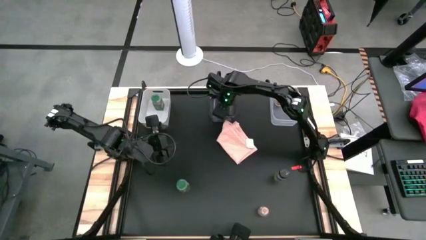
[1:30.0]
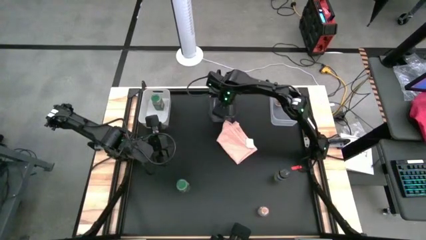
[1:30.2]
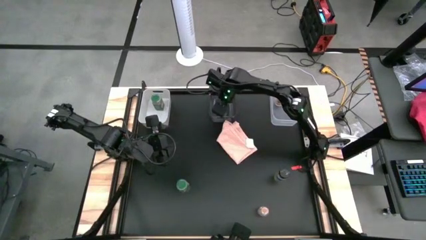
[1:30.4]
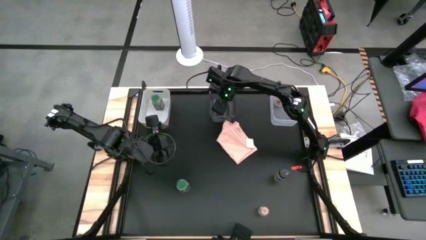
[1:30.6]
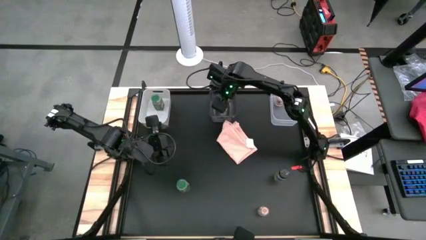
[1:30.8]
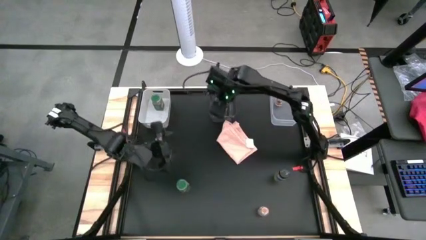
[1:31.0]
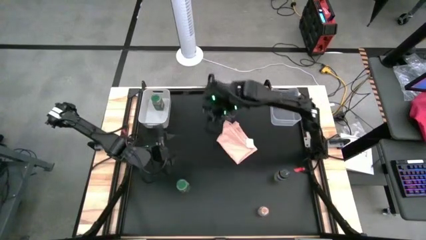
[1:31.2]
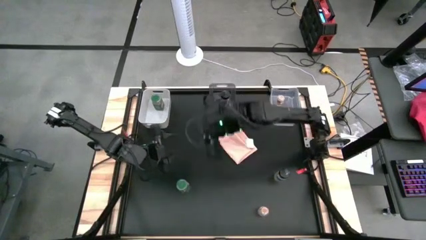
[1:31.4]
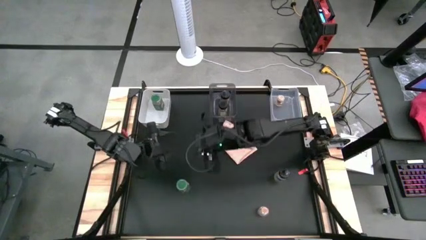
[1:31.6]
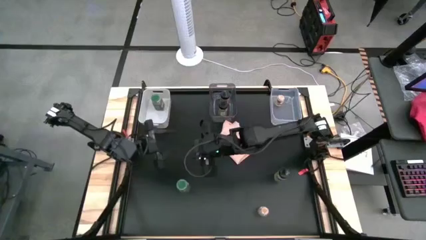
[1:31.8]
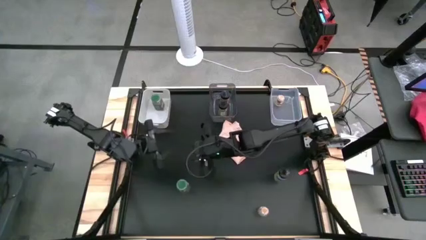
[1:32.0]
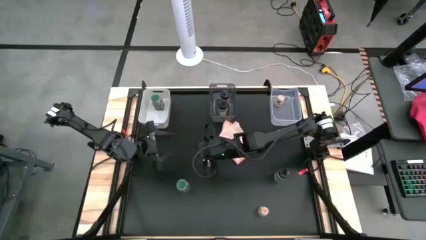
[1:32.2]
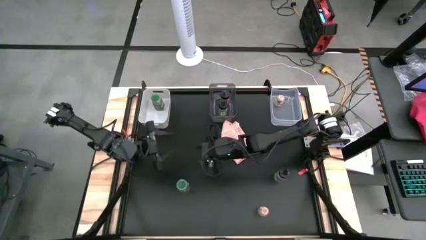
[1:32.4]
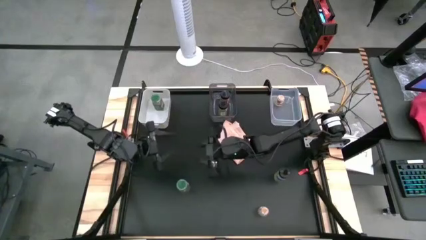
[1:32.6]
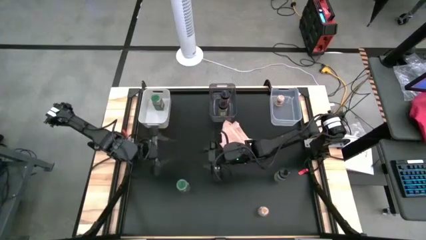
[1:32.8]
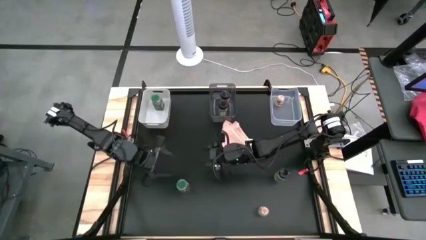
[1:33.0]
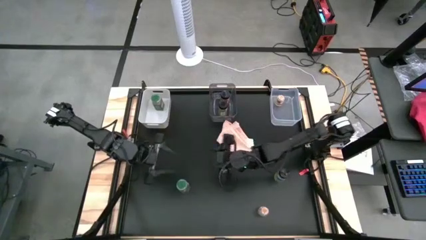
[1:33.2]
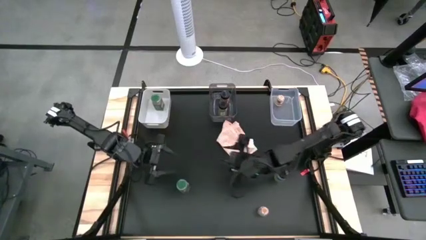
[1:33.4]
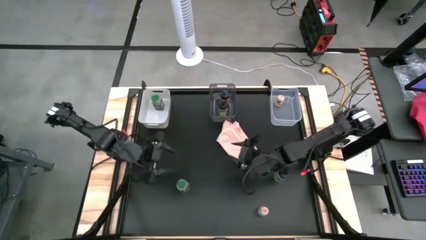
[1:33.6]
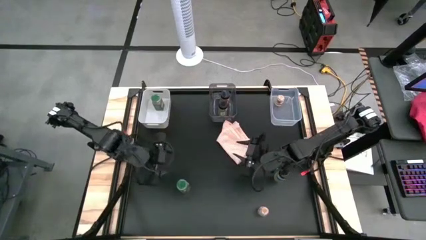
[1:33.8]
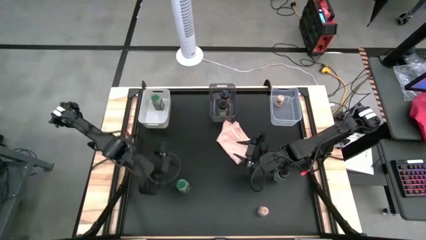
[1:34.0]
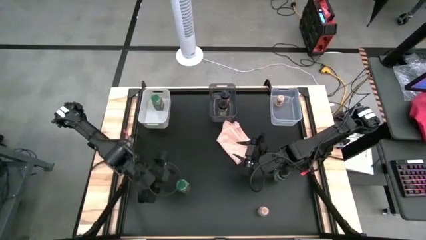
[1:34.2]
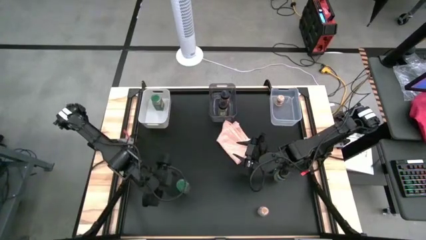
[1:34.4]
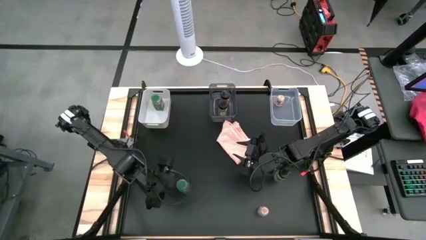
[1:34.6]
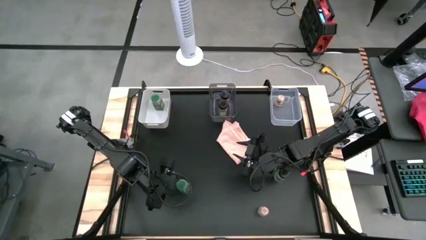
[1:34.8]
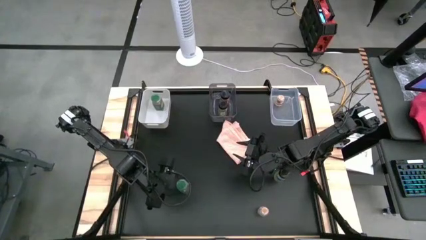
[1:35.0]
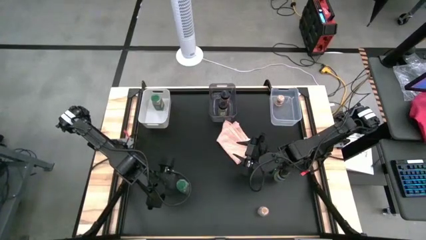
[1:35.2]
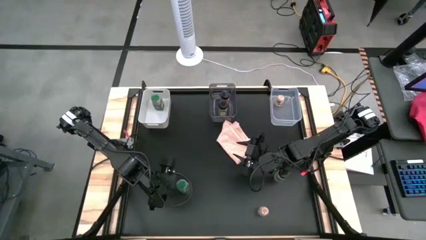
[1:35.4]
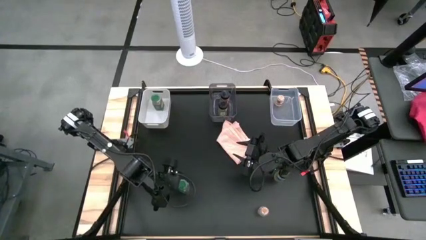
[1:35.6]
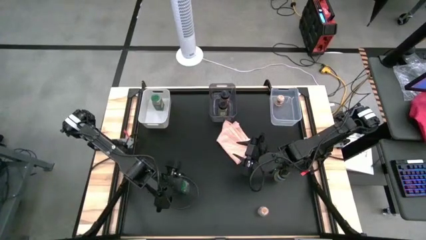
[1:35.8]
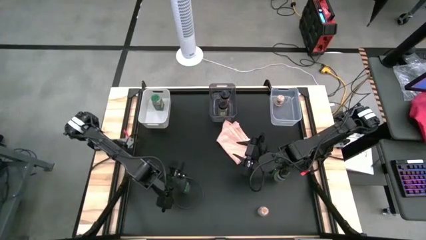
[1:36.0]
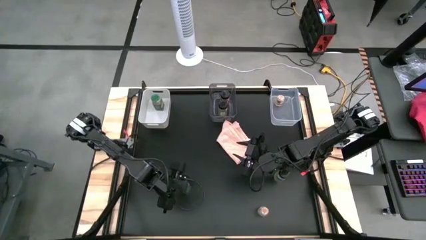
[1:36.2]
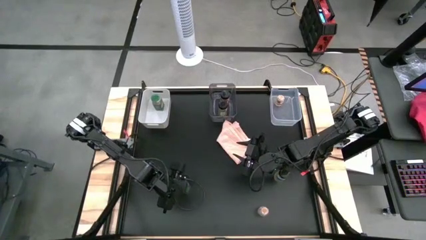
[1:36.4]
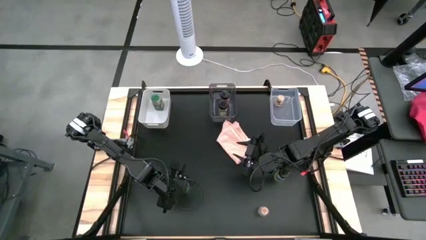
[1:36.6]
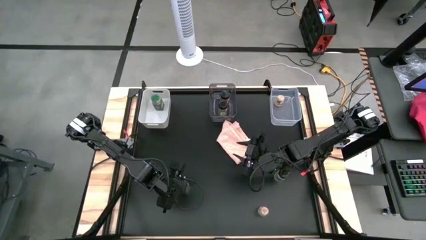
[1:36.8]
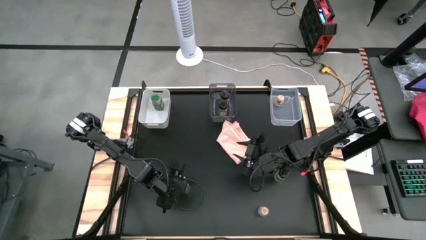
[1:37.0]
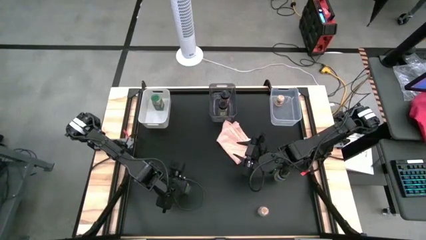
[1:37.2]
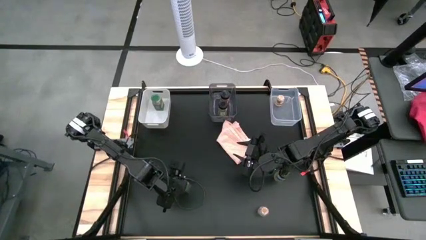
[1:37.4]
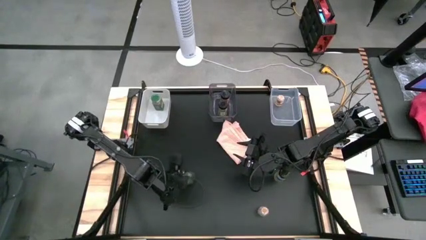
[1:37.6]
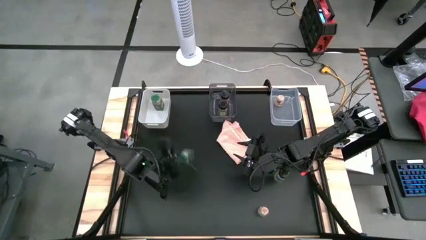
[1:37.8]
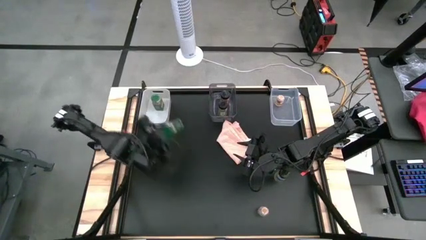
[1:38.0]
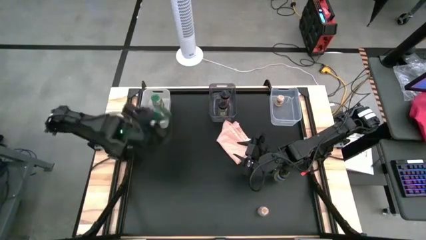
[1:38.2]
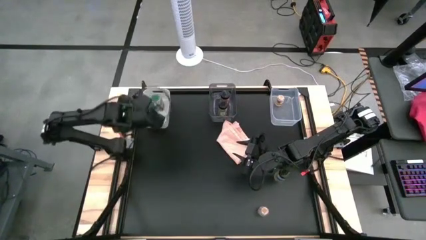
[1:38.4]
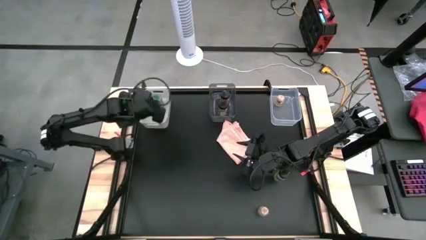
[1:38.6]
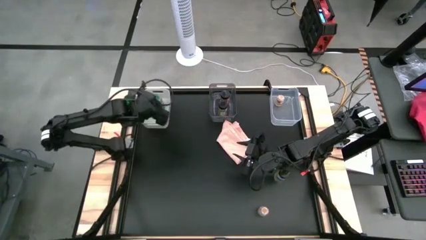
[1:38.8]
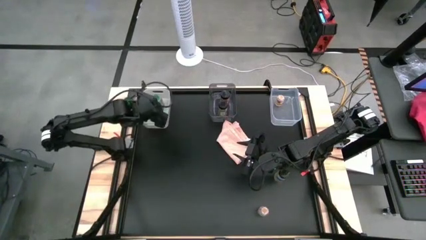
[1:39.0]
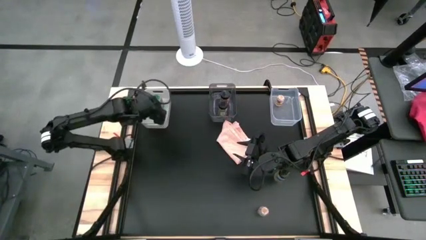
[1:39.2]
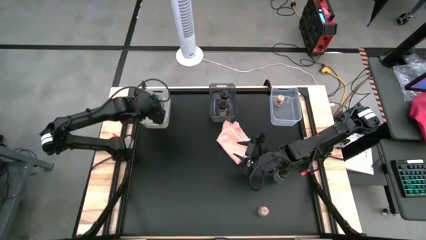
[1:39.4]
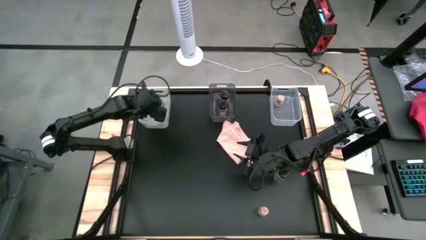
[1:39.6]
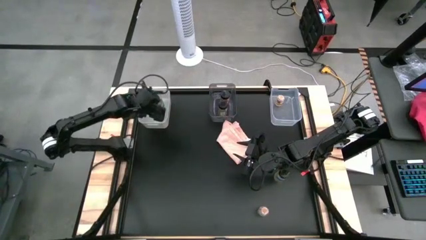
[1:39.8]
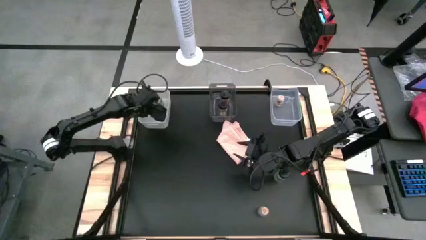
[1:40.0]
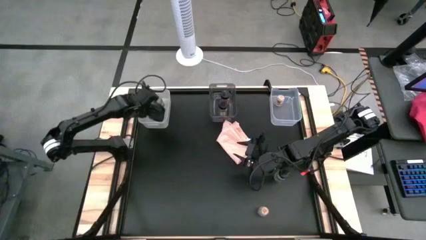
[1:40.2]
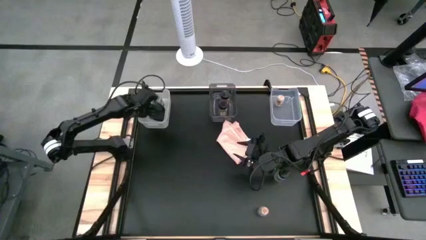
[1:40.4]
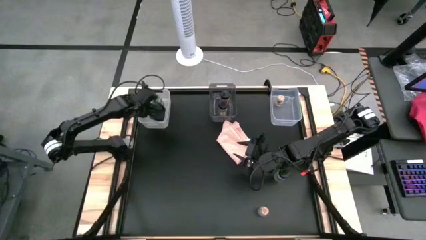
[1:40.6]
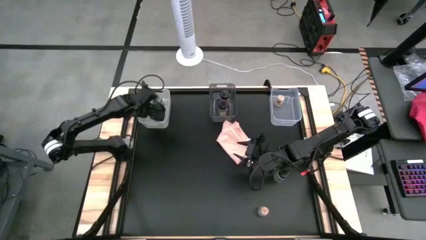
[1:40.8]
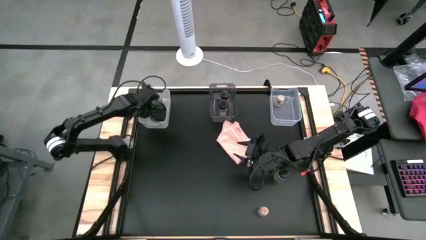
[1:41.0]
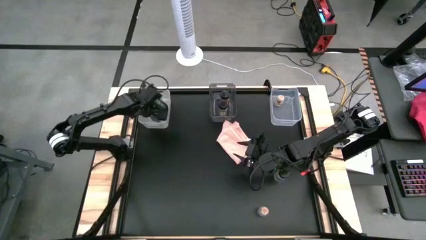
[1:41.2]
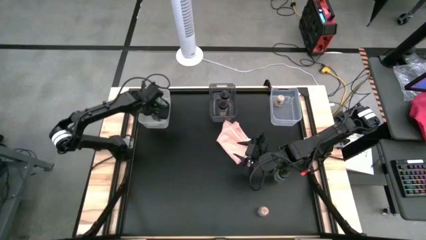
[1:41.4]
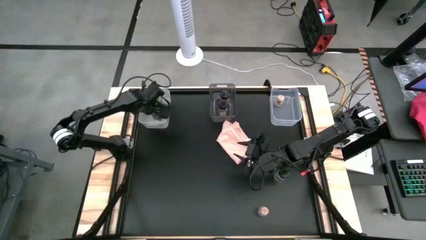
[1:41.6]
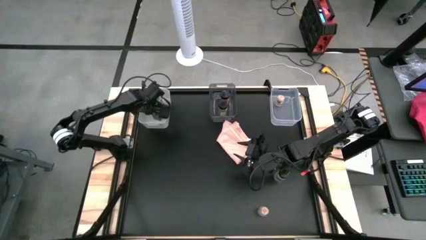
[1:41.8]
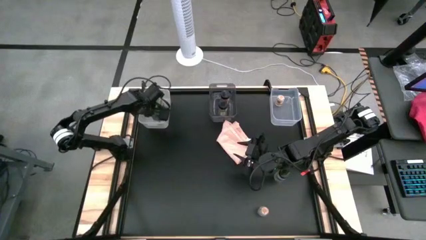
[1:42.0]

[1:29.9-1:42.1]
Task: Sort spices by type
Put the green seasoning bottle into the white bin
